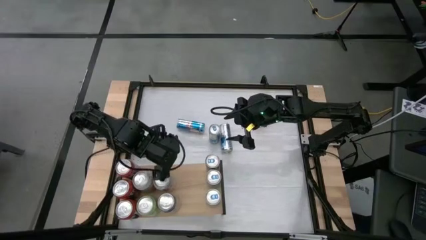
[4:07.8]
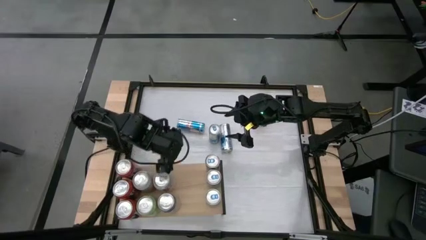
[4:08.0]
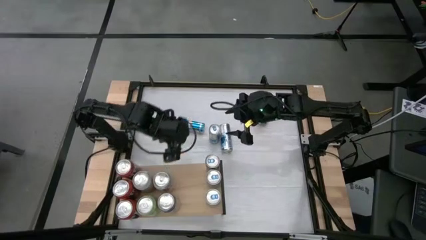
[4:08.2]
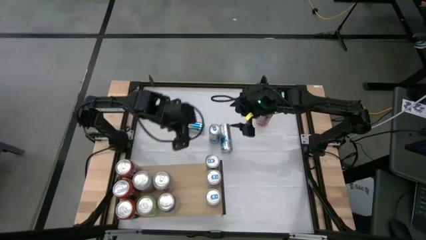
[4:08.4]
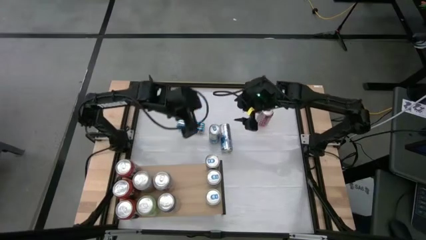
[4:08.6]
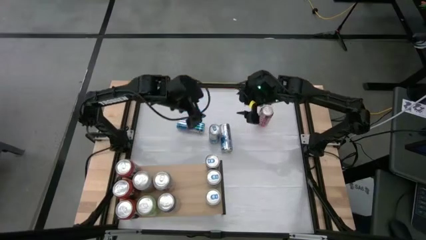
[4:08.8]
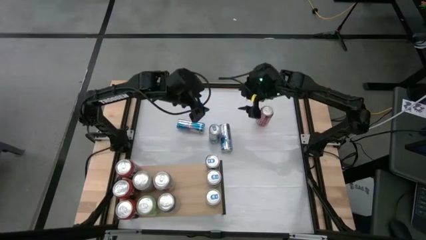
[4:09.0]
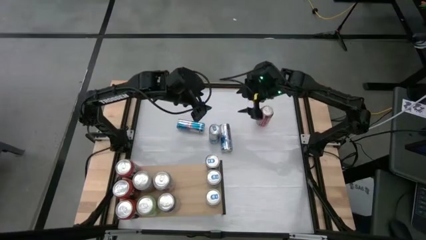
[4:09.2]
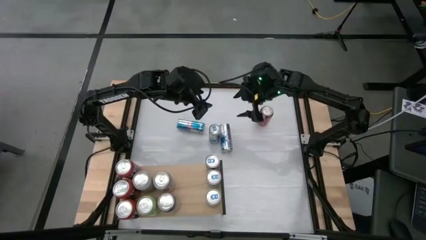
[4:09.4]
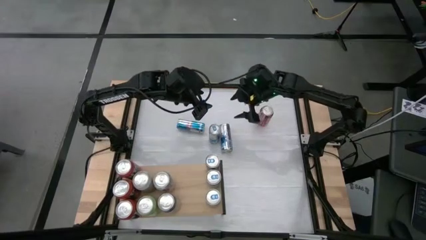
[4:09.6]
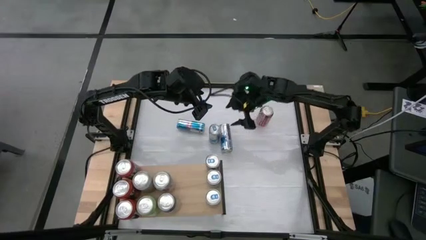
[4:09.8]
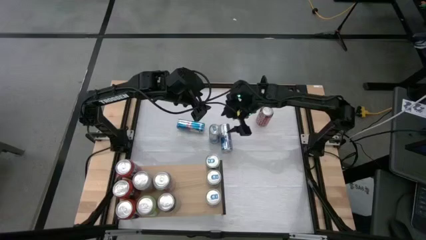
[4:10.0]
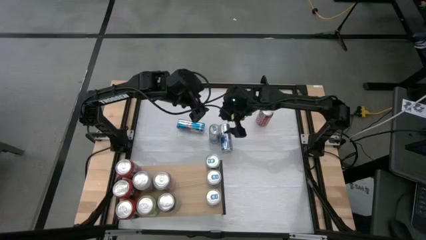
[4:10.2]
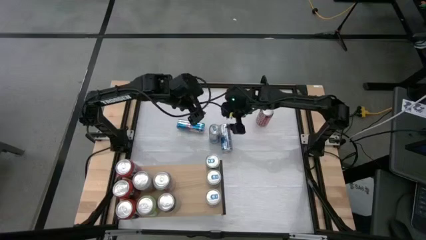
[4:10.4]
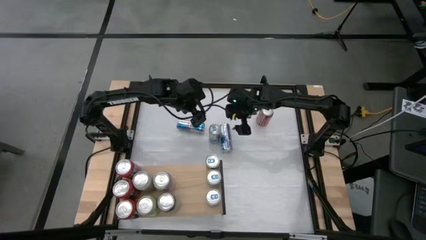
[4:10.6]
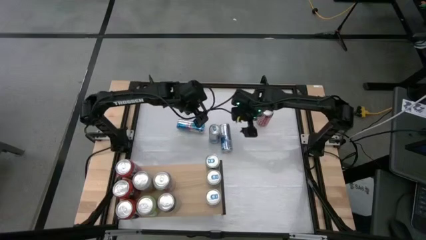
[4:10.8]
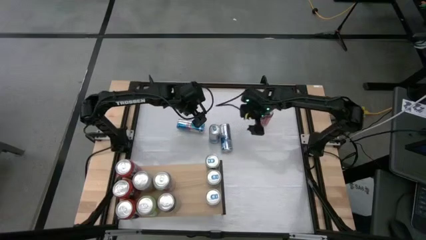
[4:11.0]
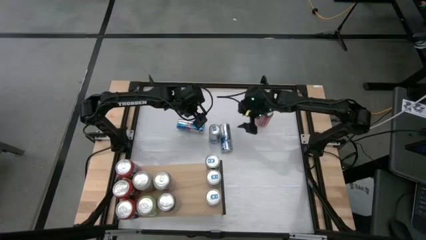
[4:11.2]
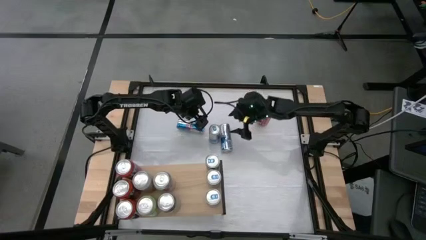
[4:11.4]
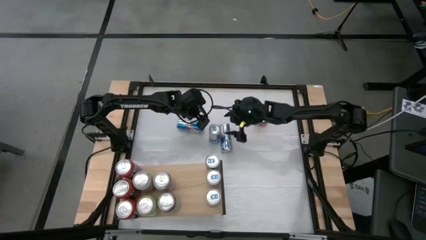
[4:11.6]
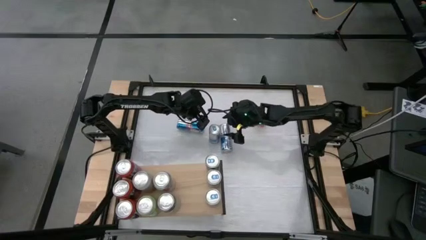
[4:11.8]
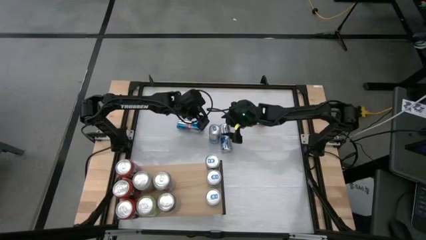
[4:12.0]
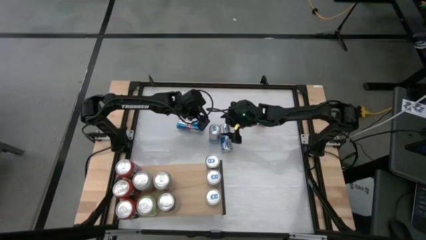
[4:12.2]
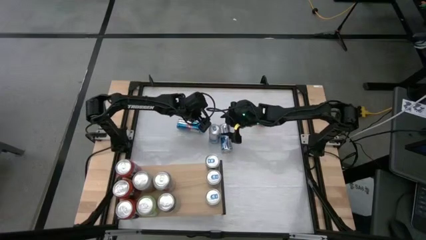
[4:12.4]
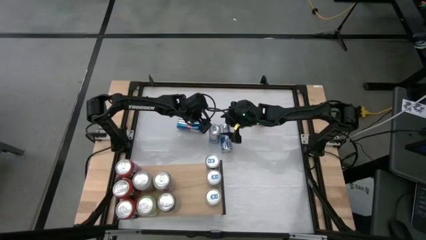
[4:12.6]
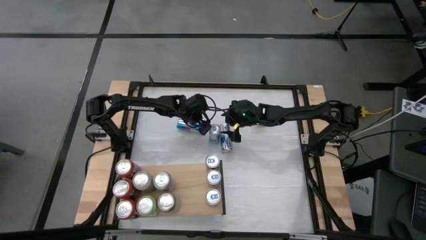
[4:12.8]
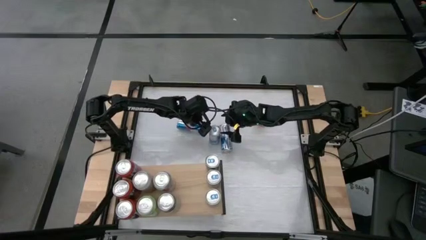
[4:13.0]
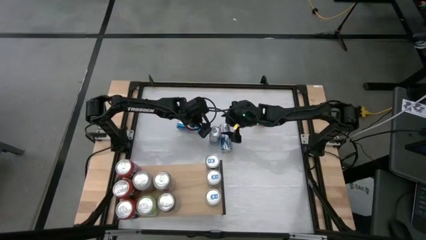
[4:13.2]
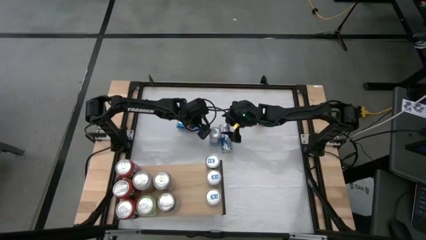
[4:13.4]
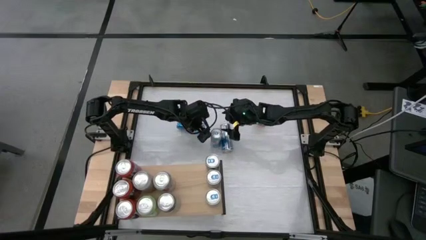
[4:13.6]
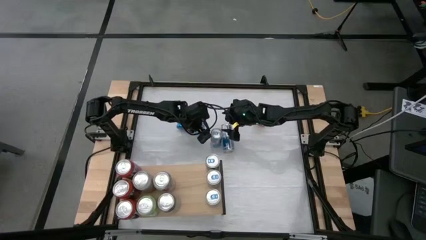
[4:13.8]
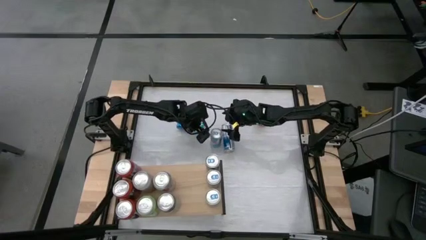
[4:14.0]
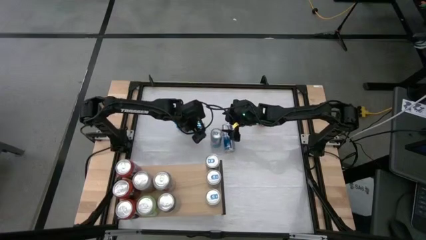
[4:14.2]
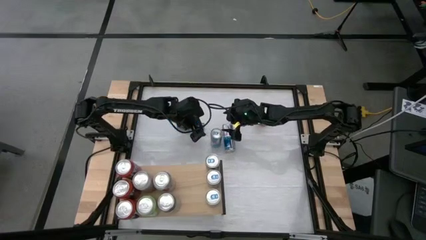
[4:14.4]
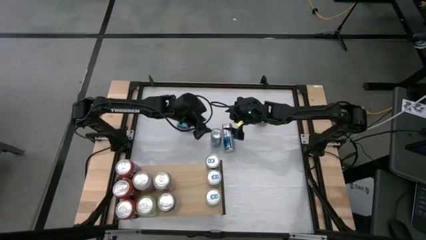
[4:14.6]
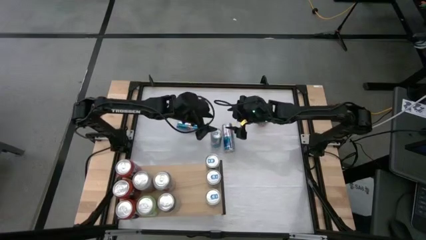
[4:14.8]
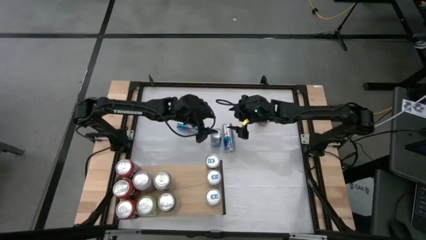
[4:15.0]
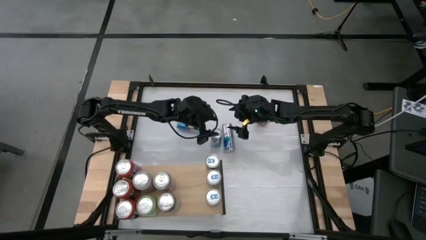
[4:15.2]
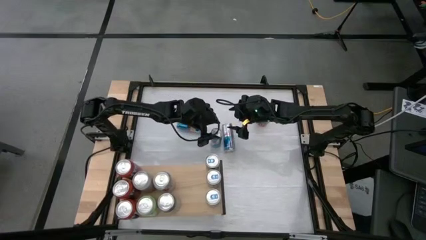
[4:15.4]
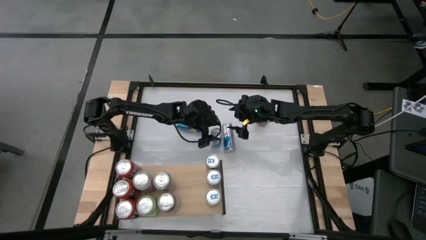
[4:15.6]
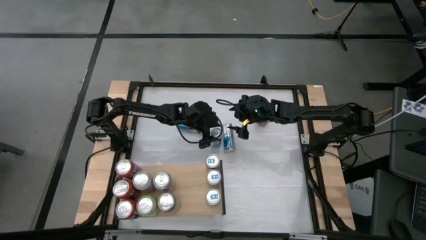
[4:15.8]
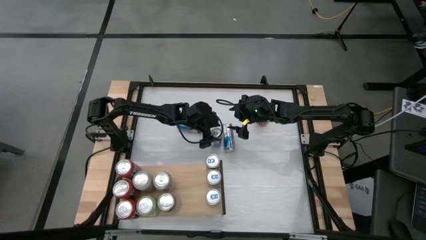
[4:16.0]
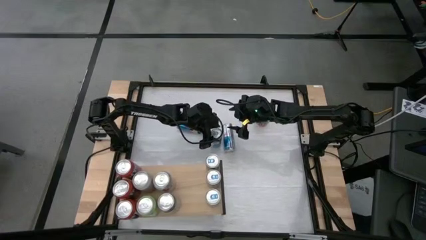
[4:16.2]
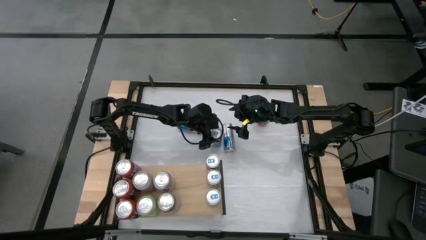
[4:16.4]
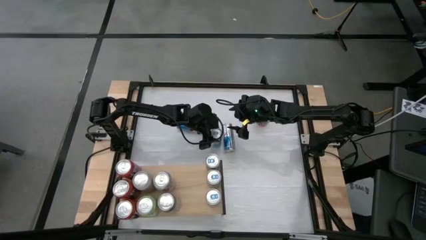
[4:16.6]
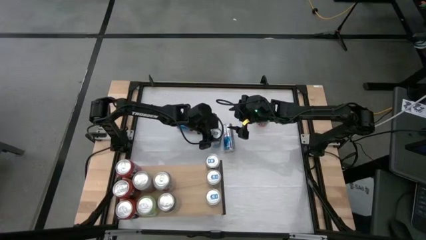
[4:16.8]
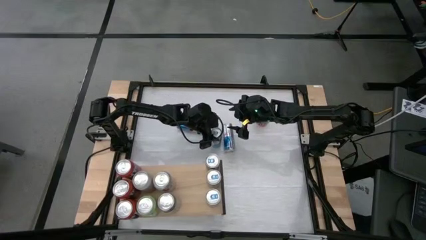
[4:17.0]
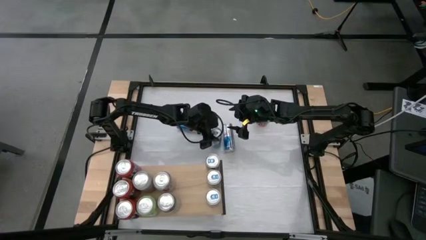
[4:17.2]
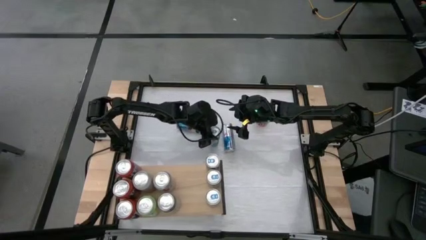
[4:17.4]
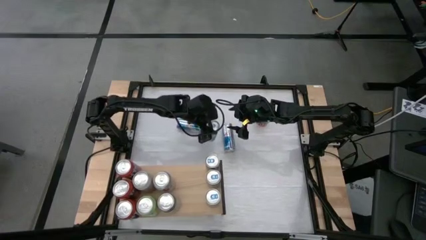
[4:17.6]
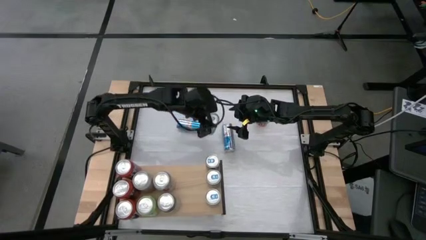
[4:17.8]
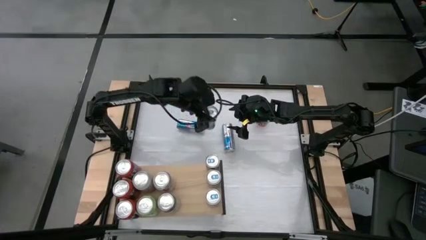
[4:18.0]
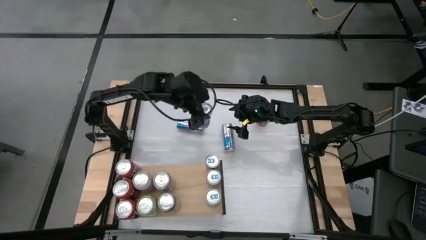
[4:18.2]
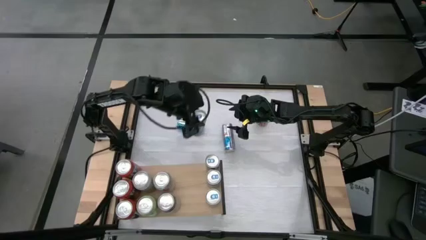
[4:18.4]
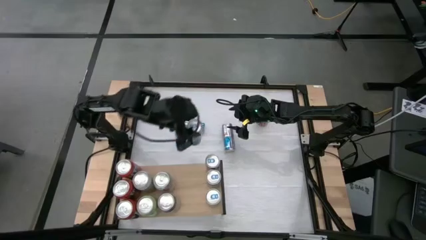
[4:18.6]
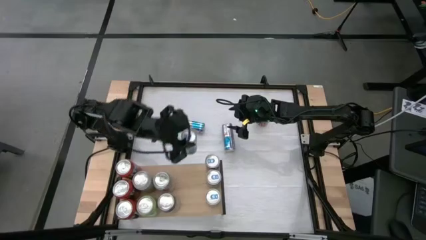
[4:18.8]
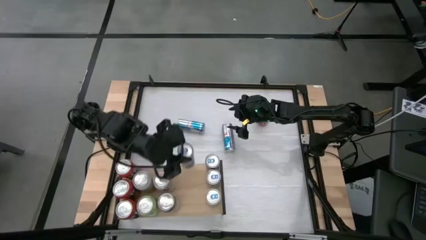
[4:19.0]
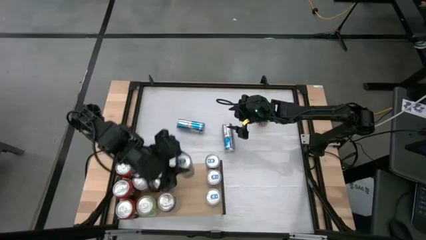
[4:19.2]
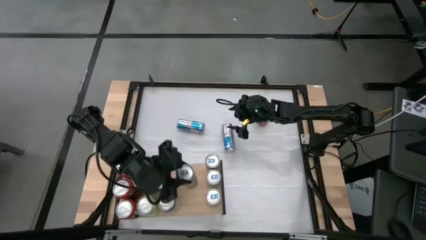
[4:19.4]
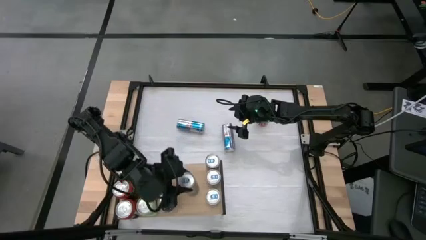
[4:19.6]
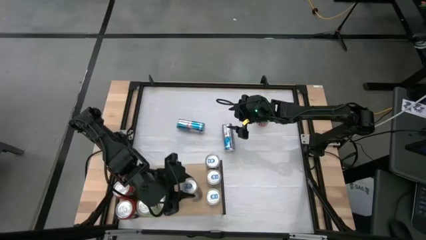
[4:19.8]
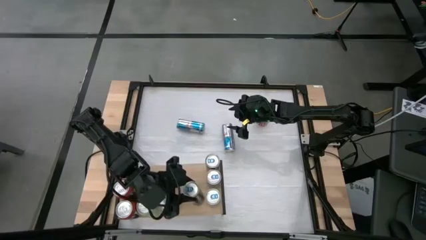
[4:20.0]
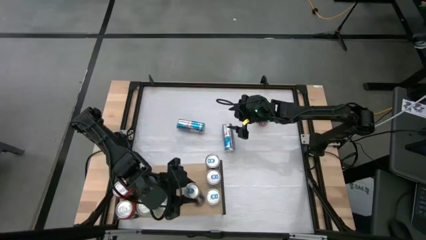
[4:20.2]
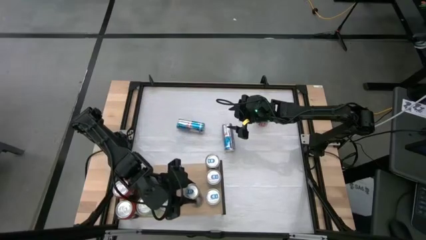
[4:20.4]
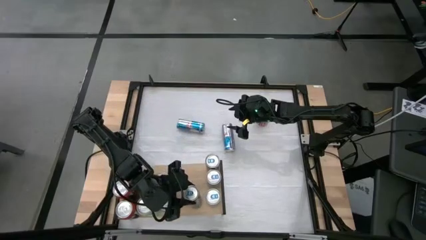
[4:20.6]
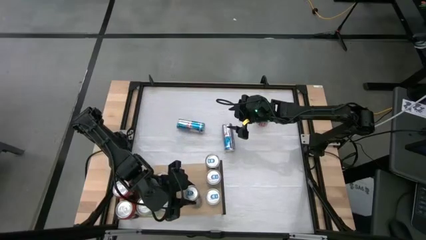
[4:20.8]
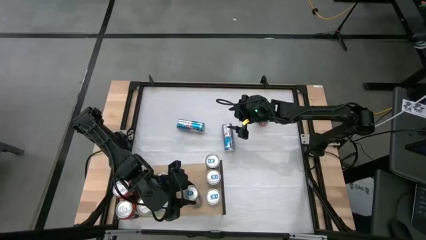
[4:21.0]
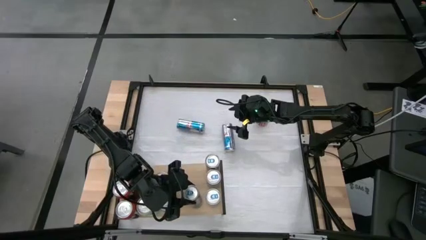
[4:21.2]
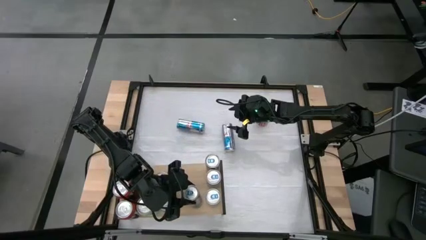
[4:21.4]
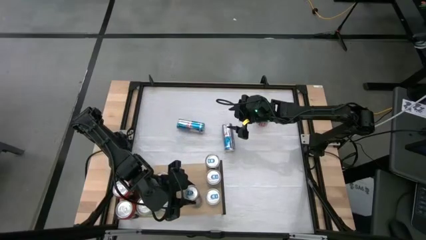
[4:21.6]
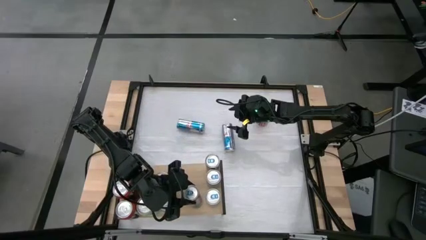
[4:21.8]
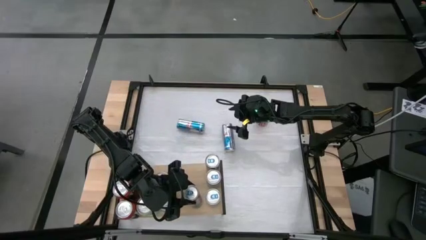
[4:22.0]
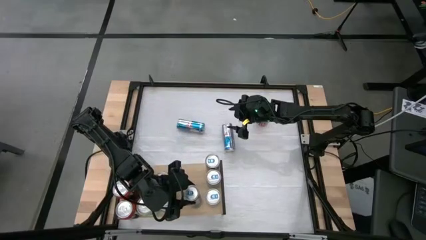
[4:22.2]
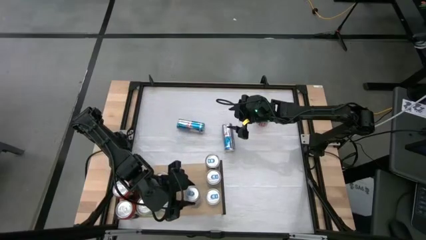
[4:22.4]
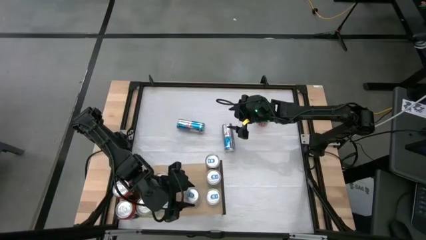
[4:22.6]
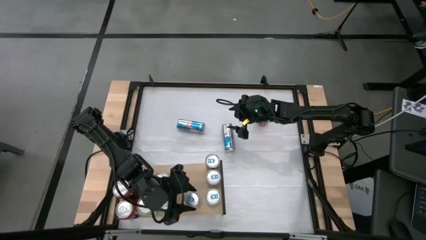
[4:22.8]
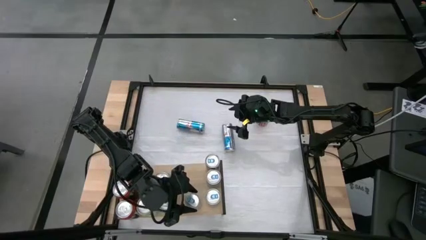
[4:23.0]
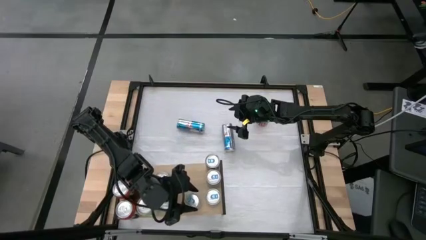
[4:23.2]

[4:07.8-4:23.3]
Task: Place canned beverage on shelf
Put the blue soda can on the shelf

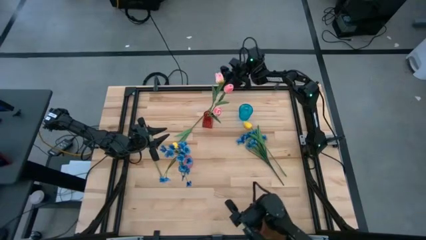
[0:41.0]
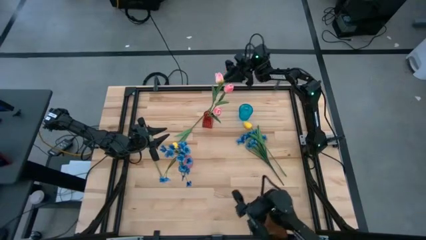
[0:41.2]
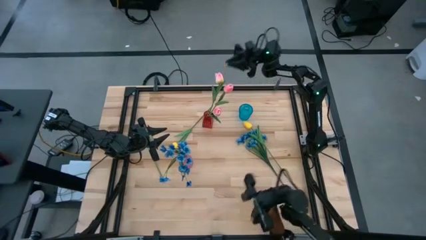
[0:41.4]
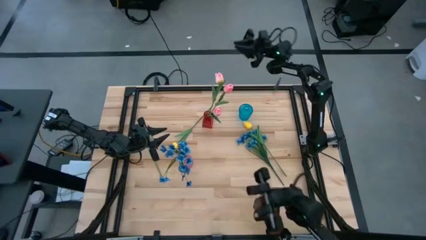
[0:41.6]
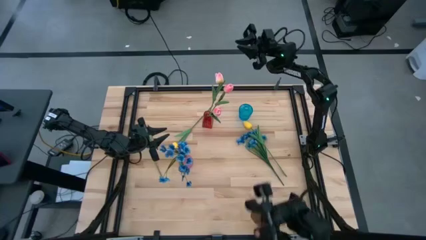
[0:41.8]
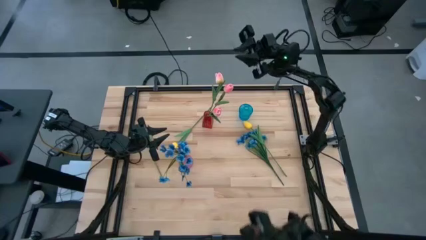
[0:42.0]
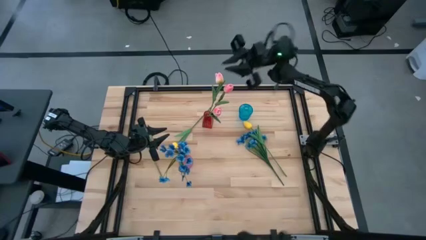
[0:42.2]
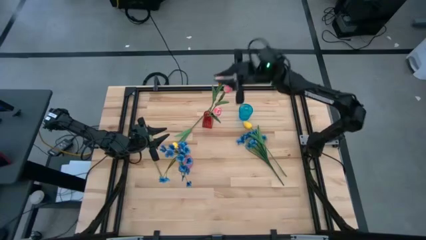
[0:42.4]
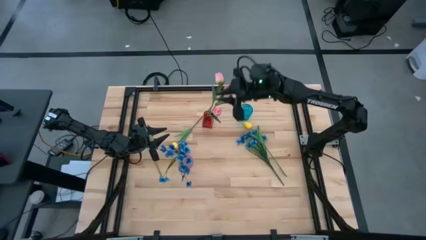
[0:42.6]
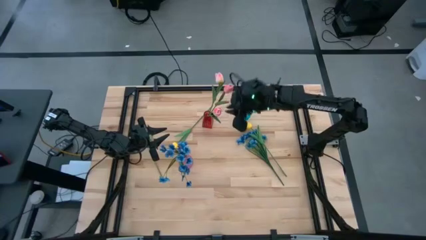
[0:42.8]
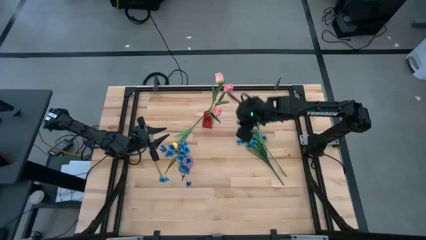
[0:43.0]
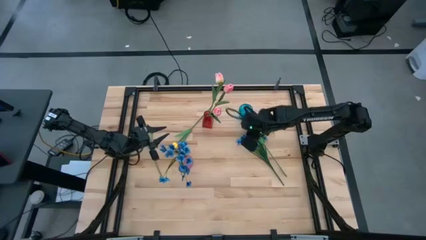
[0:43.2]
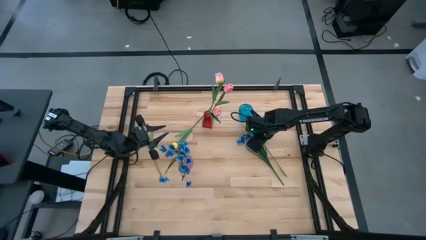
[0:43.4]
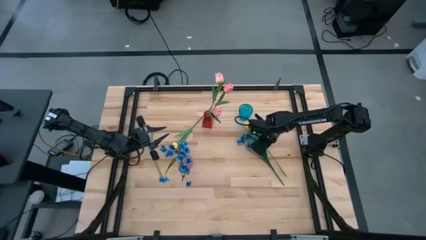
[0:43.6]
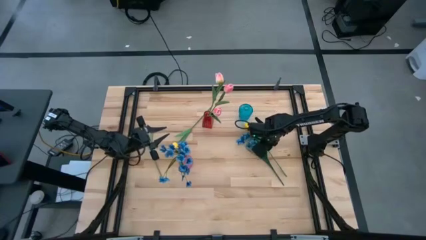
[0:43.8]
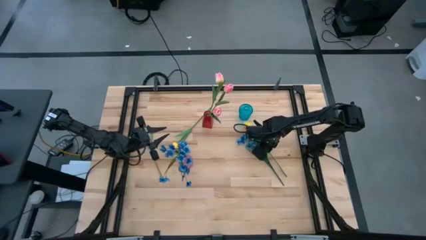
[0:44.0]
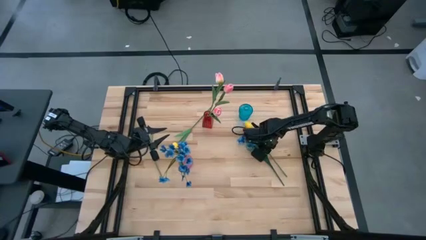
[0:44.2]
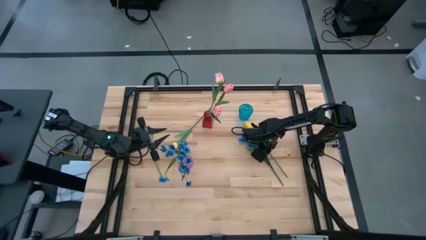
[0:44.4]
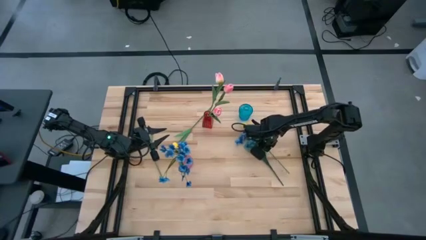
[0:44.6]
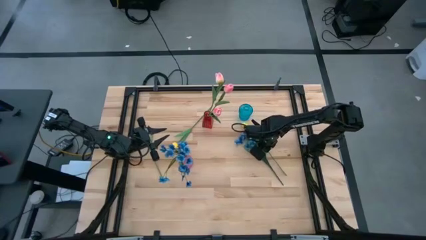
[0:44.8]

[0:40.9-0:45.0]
Task: Sort flowers into vase by color
Put the yellow flower into the blue vase
